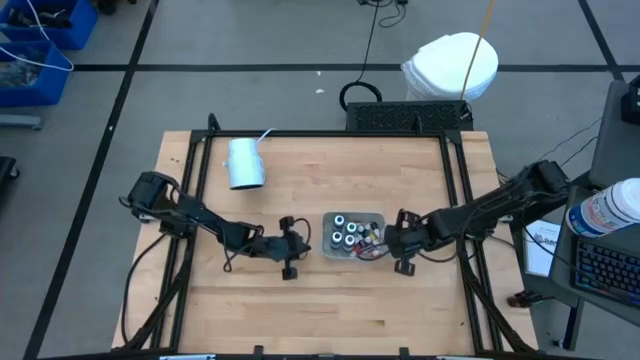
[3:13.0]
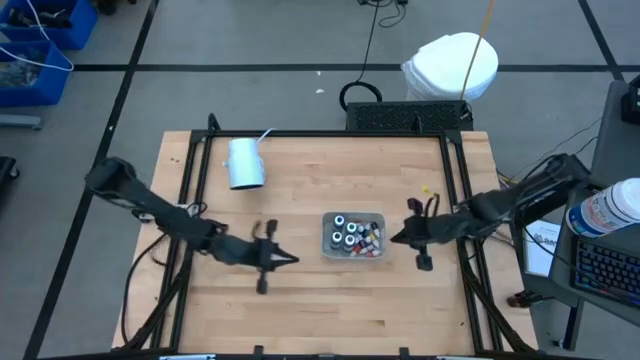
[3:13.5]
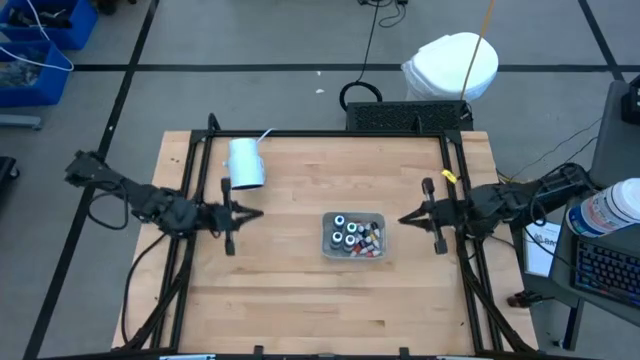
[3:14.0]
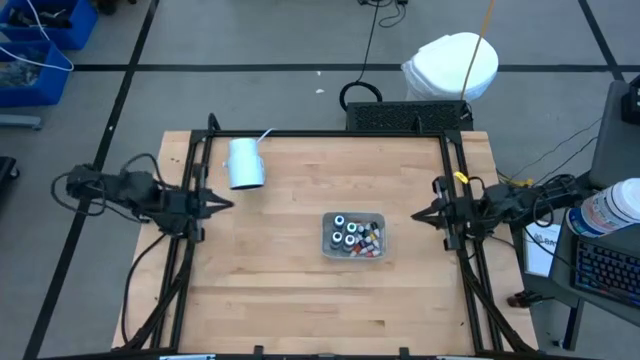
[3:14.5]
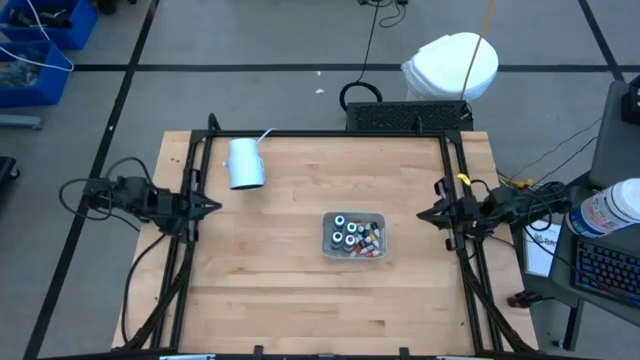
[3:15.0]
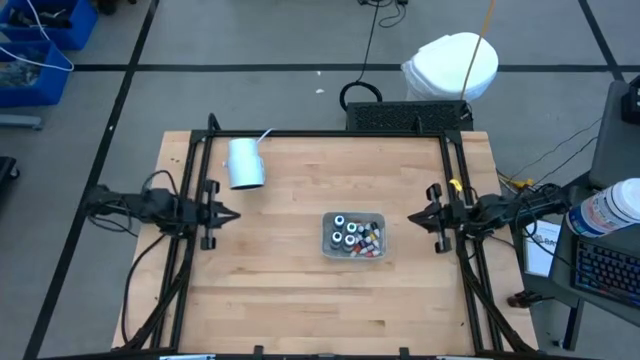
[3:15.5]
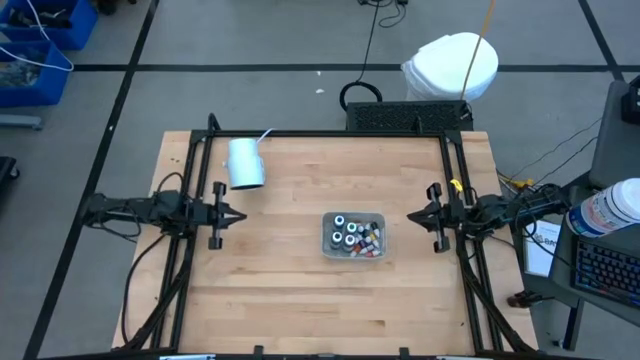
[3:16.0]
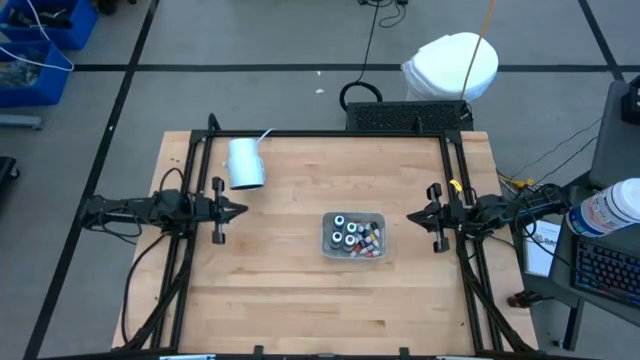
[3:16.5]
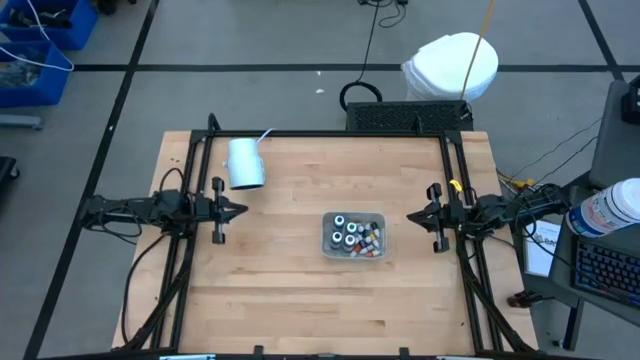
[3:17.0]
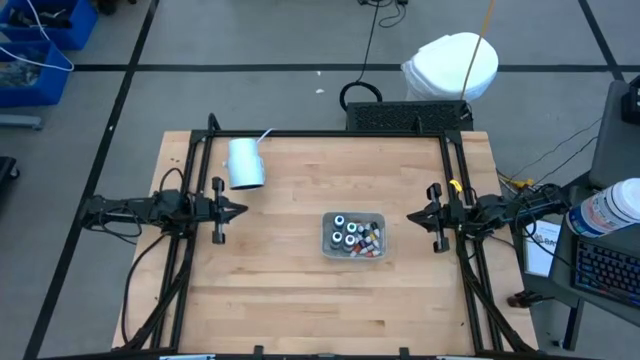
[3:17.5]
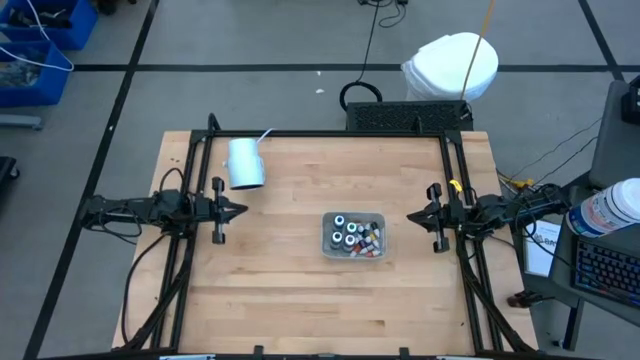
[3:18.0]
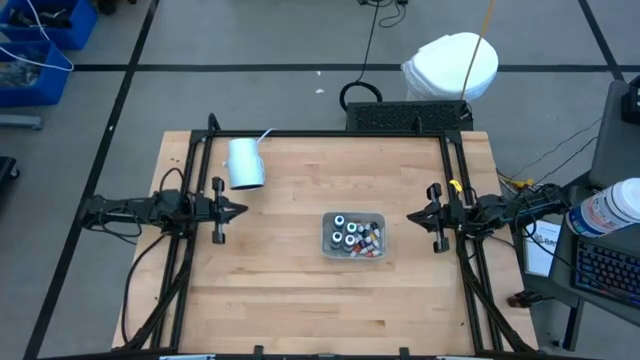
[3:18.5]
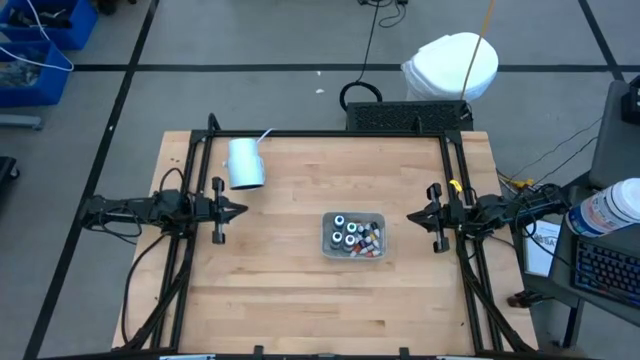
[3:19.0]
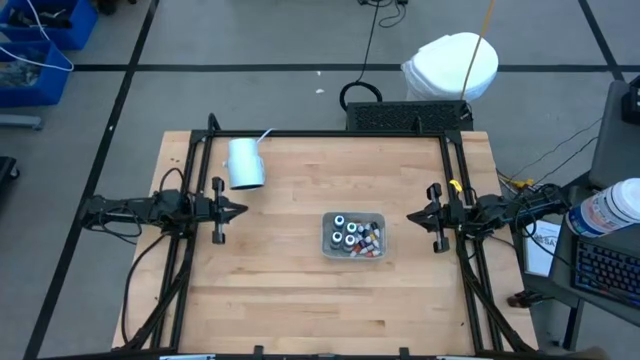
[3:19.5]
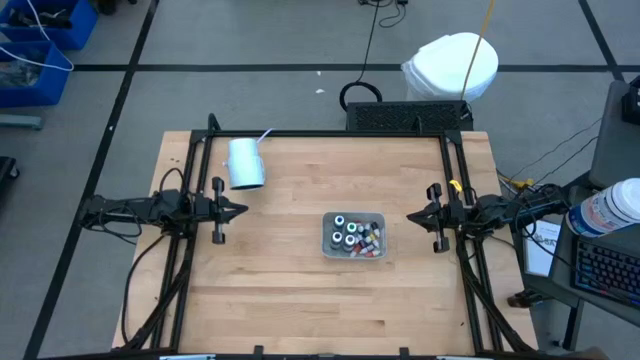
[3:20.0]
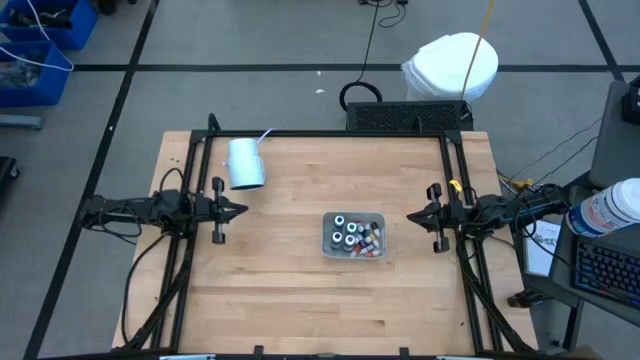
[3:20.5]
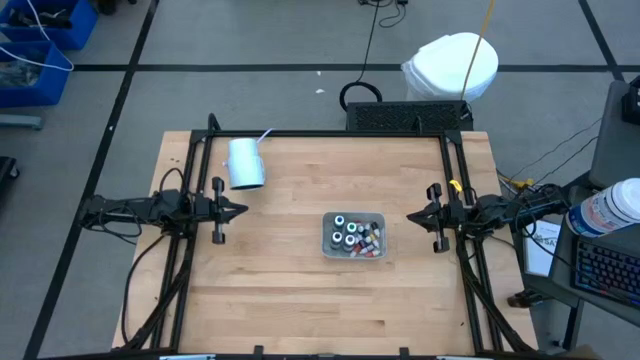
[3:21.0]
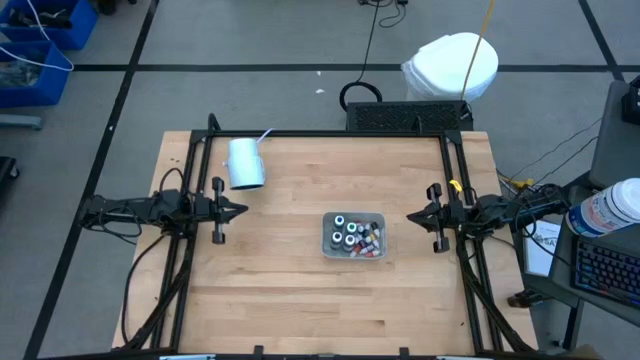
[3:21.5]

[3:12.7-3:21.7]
Task: Pick & Place food coloring
Return to Home Position

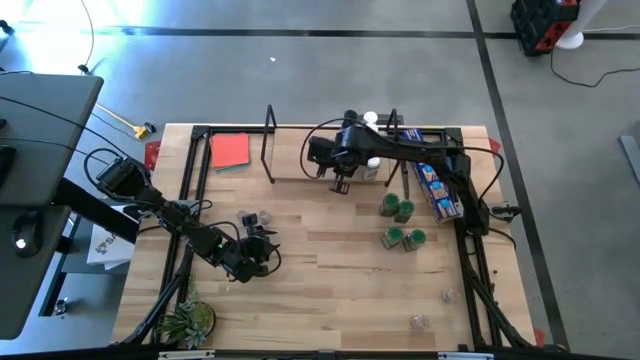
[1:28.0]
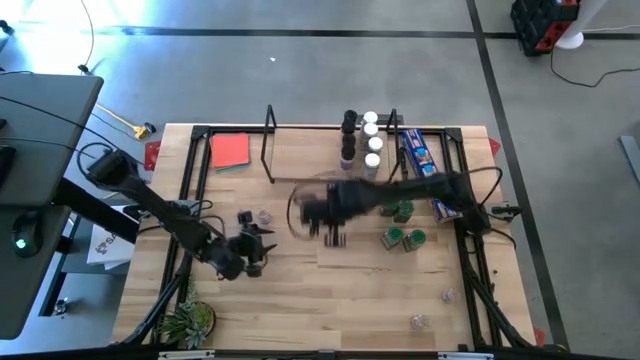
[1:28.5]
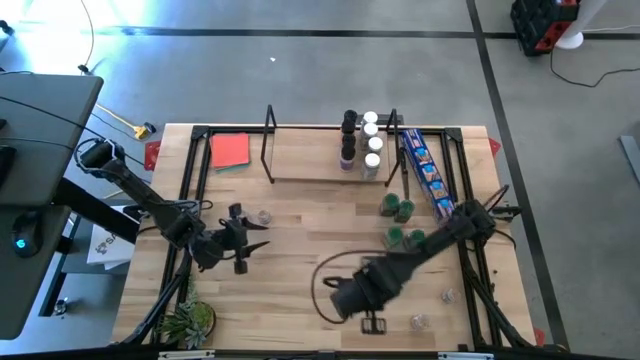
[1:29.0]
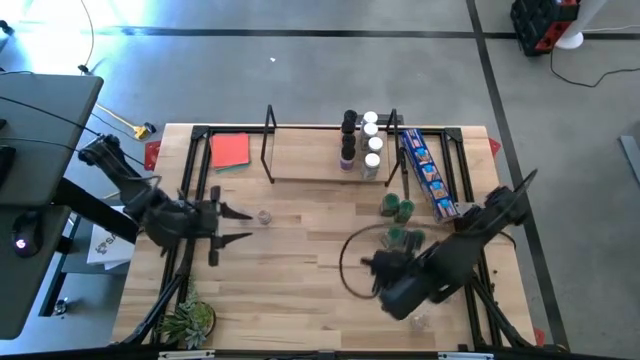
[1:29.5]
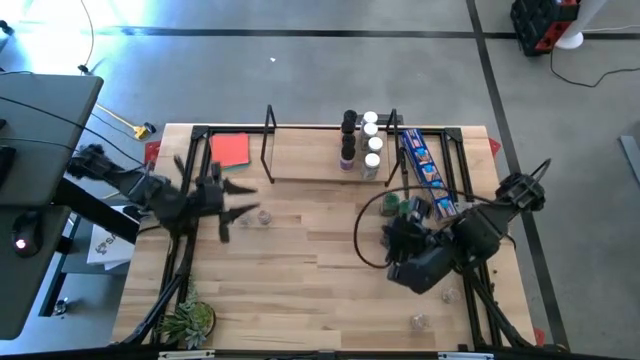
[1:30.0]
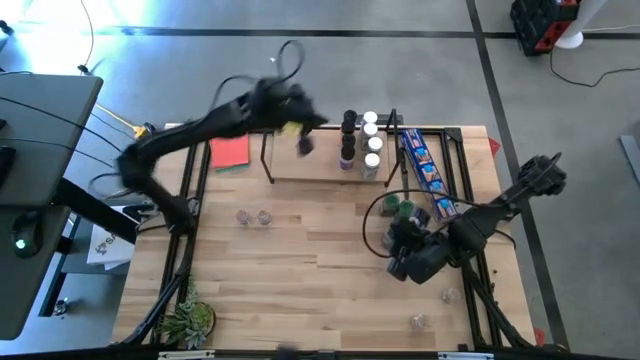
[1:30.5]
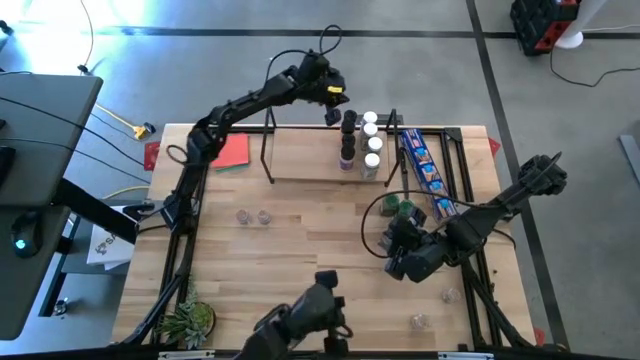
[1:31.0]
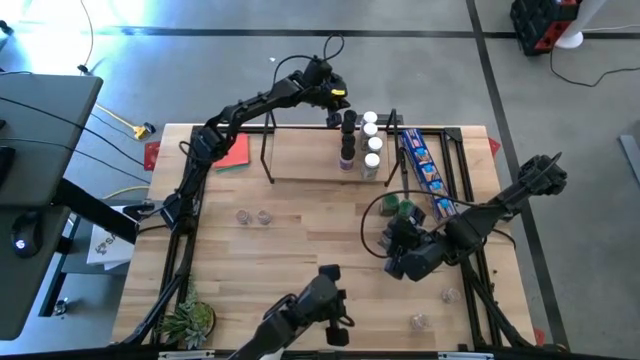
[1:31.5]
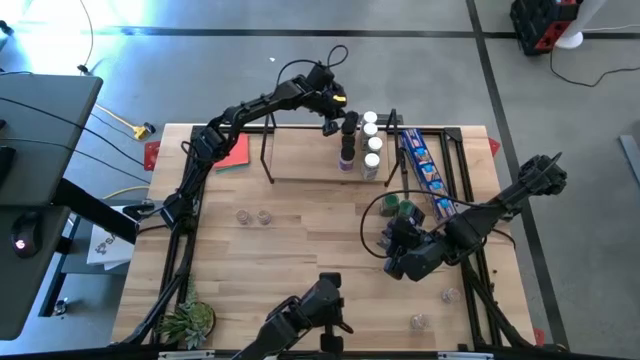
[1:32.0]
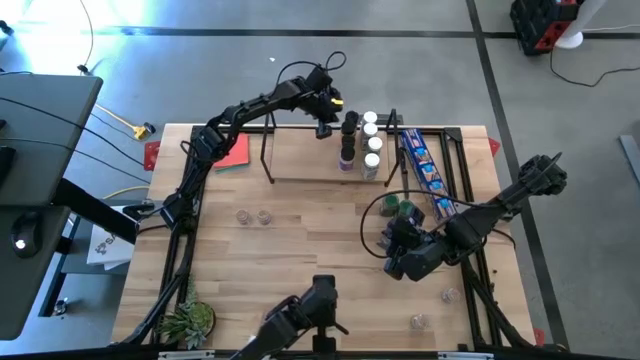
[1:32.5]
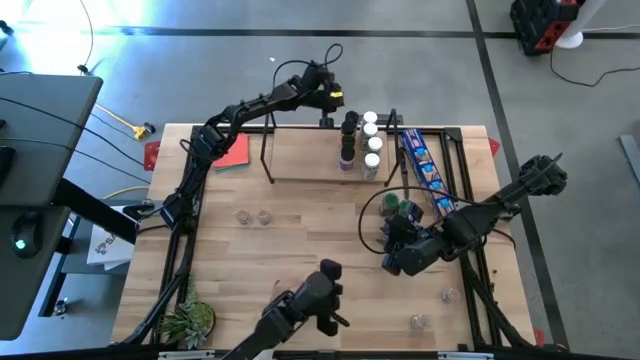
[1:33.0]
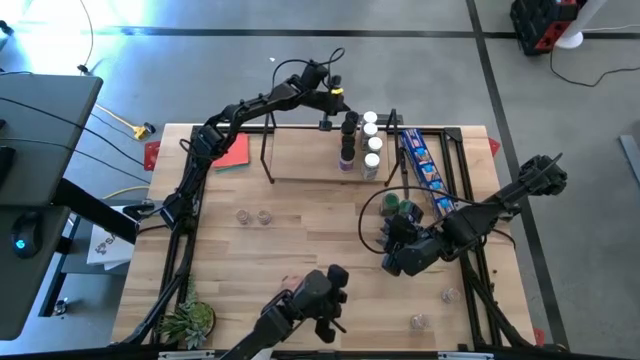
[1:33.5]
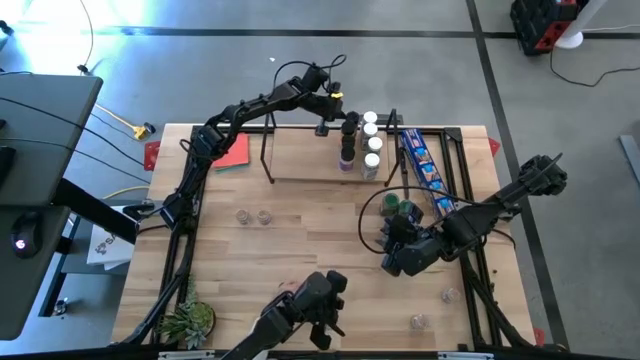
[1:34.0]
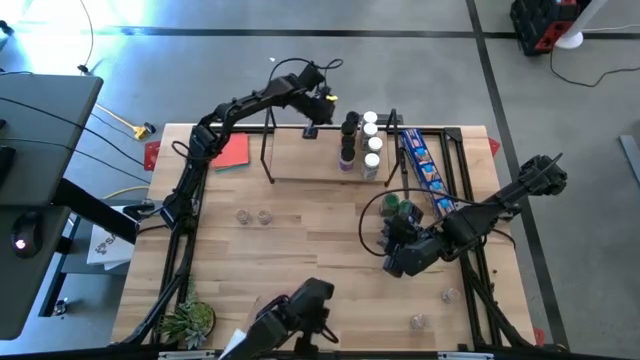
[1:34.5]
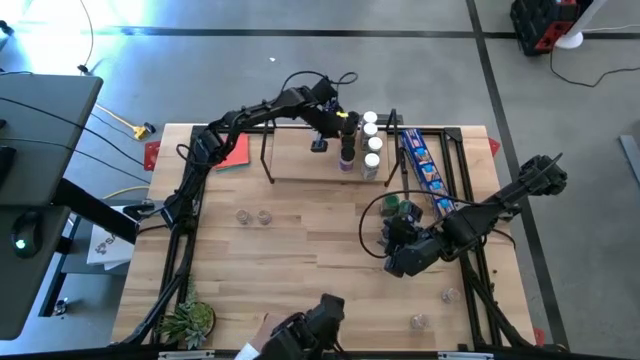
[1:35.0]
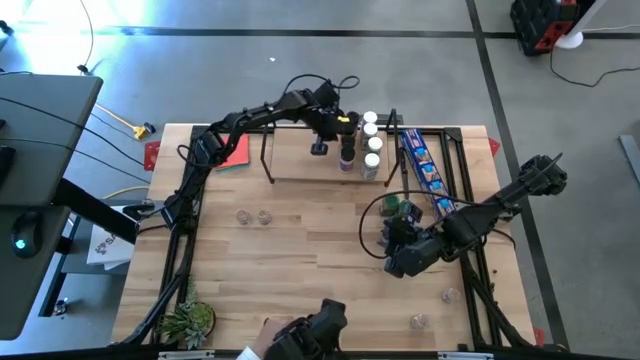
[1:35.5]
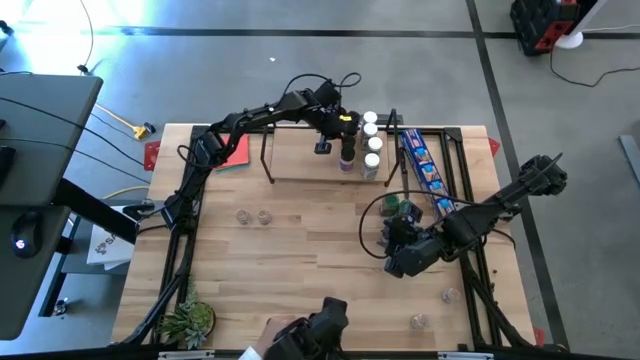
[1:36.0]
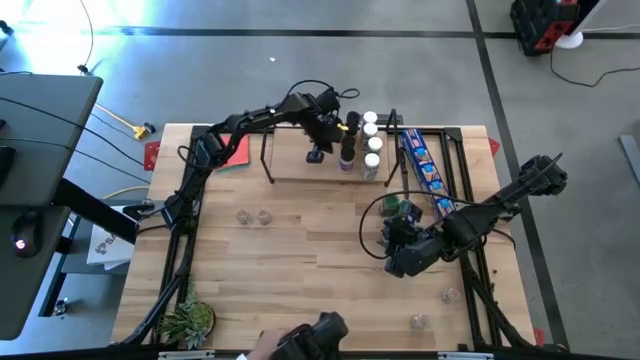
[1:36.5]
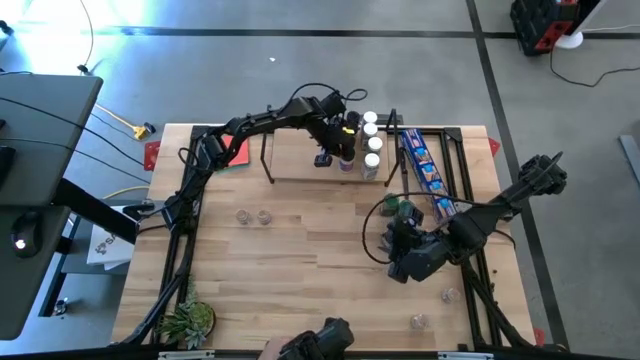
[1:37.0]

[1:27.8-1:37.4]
Task: Shelf spices
Adjust the black seasoning bottles
